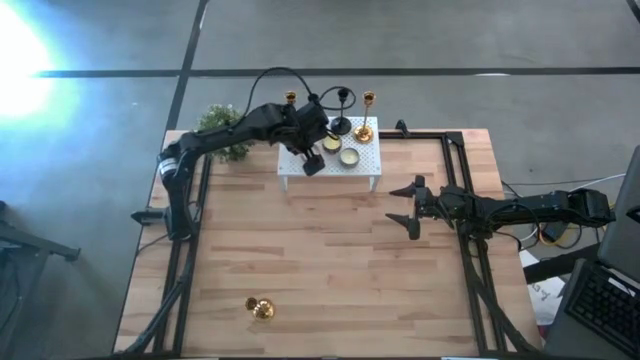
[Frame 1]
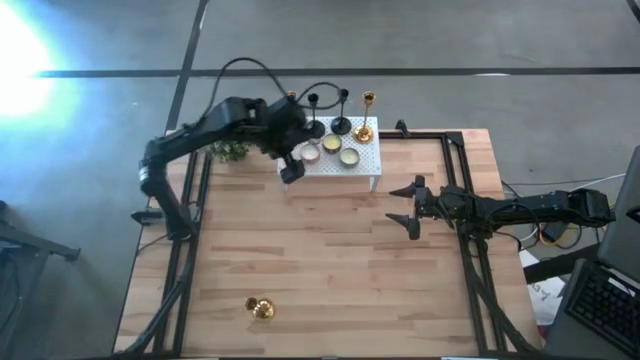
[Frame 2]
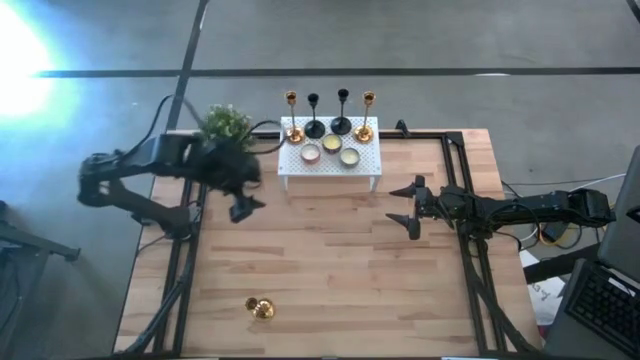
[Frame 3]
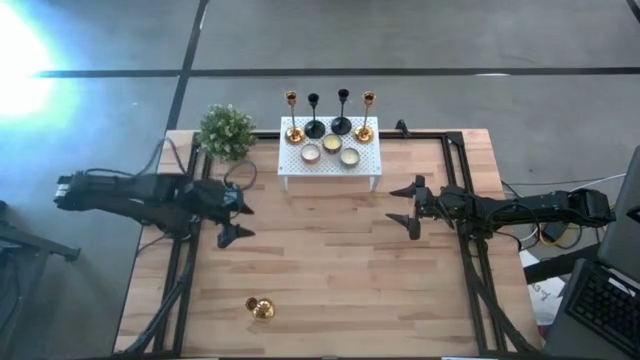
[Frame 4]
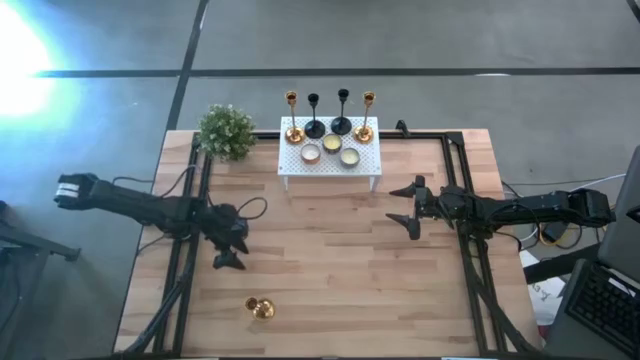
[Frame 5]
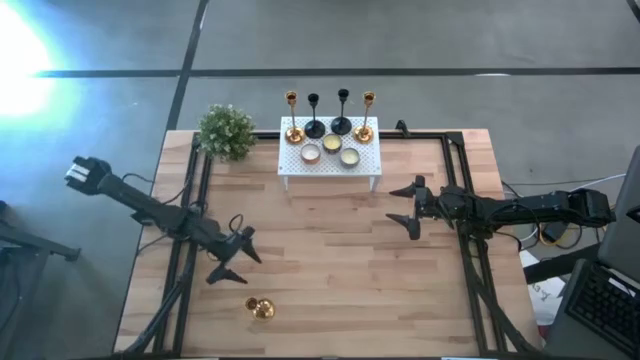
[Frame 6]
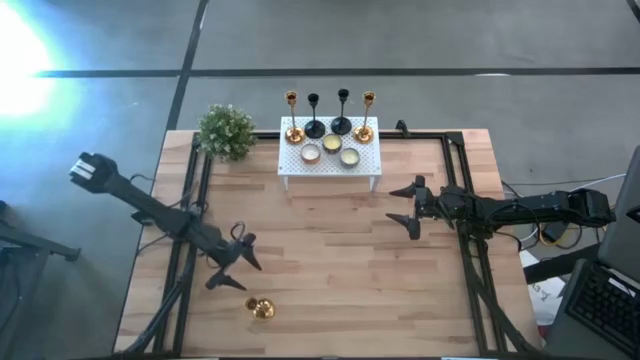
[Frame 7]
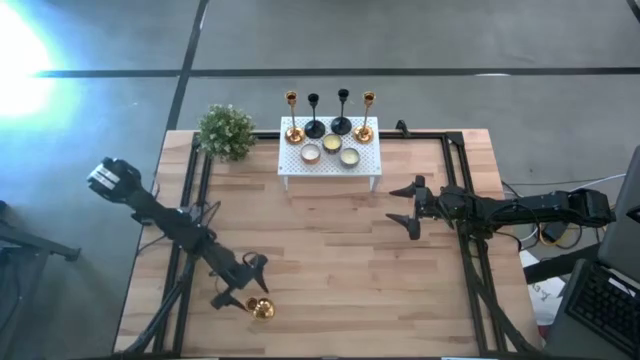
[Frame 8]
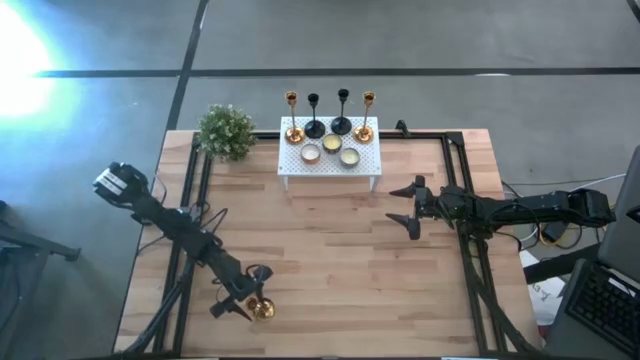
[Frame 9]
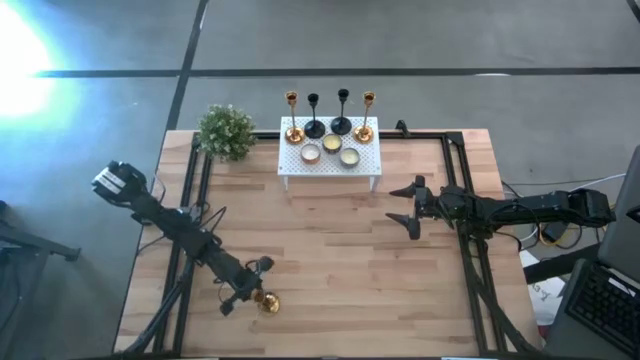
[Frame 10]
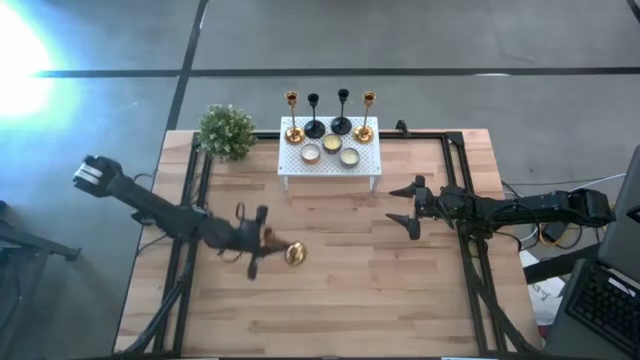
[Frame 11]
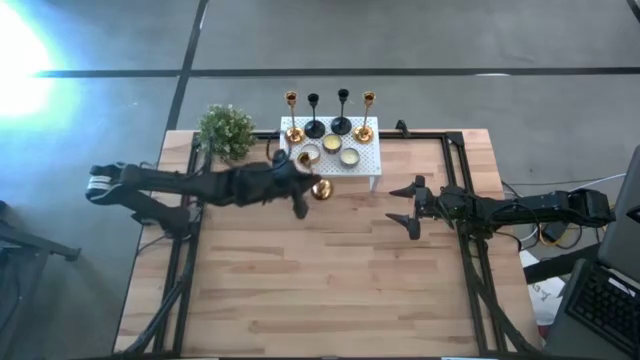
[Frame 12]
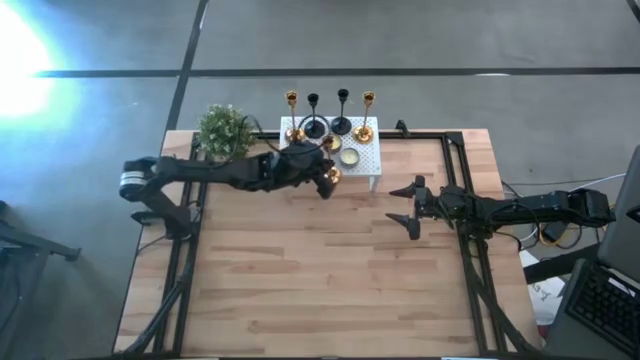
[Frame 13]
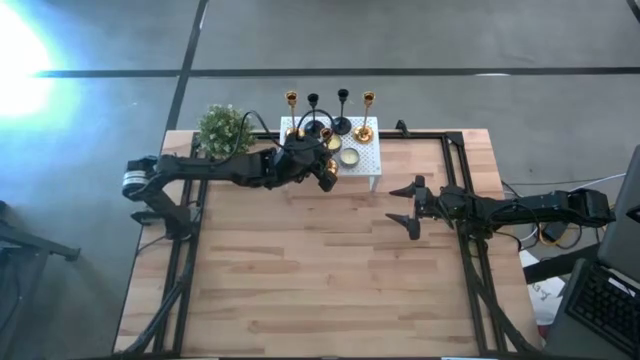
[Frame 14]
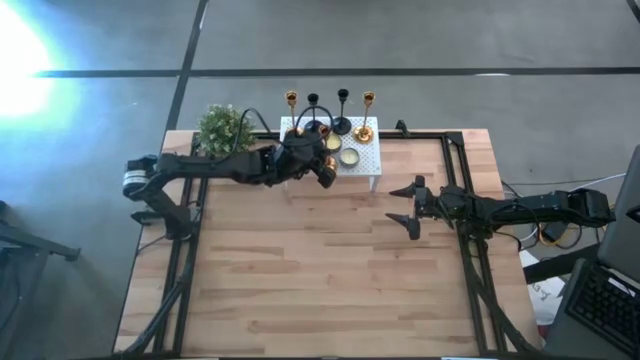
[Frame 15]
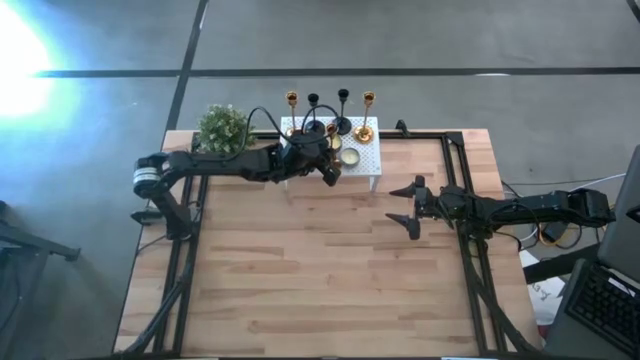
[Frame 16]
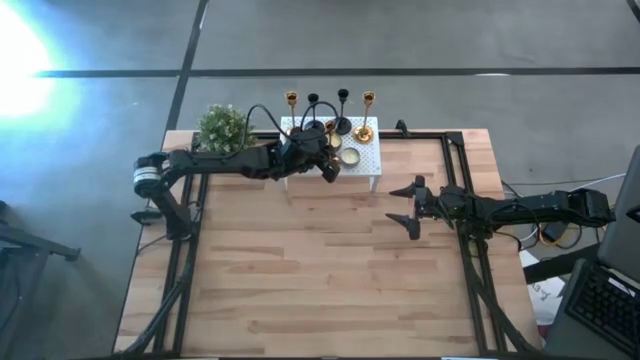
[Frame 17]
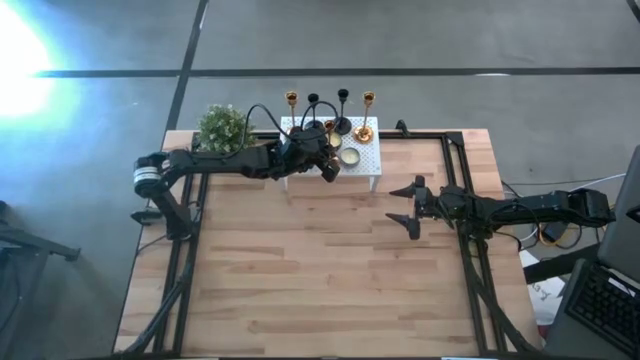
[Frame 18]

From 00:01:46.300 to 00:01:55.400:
Task: Pick & Place candle stick holders
Put the gold candle holder on the shelf

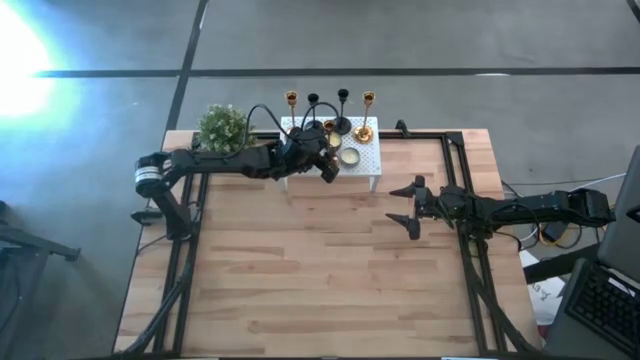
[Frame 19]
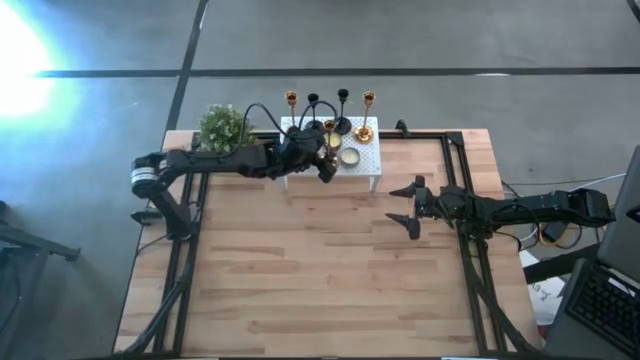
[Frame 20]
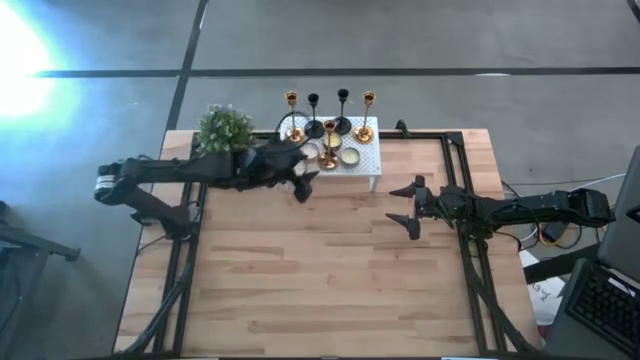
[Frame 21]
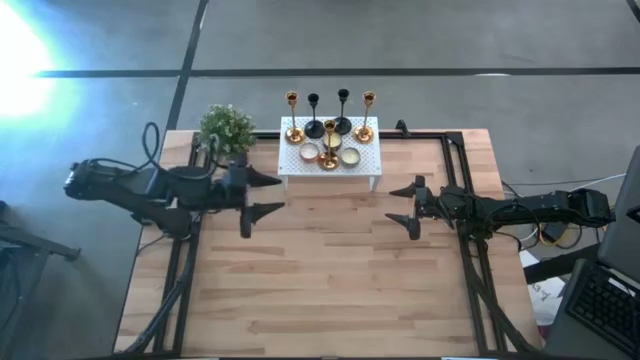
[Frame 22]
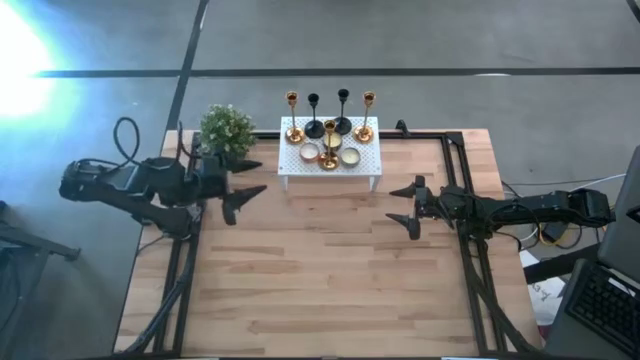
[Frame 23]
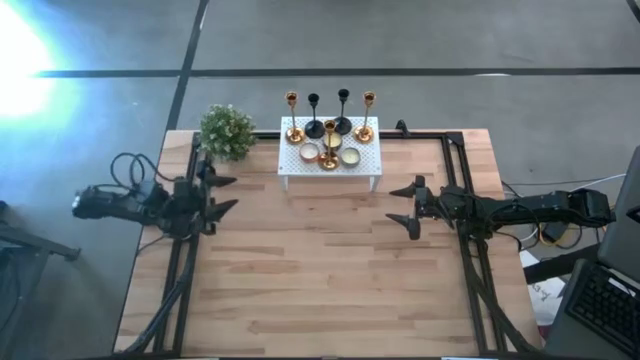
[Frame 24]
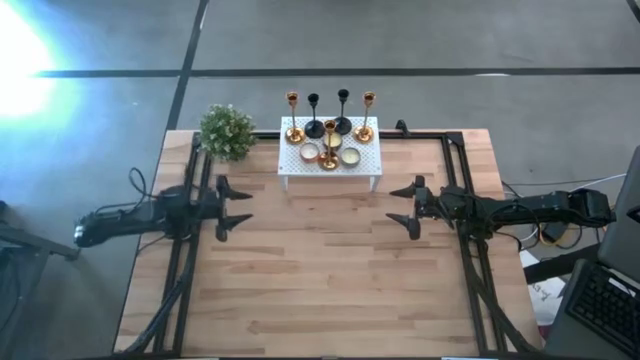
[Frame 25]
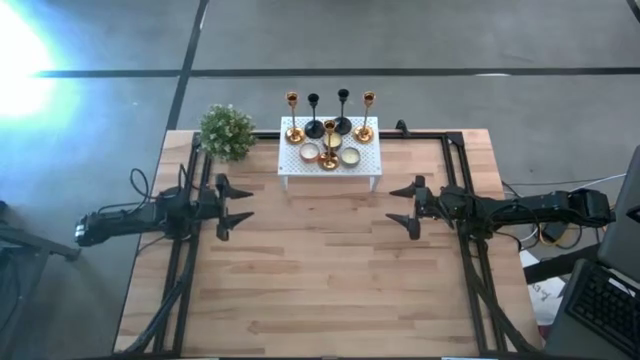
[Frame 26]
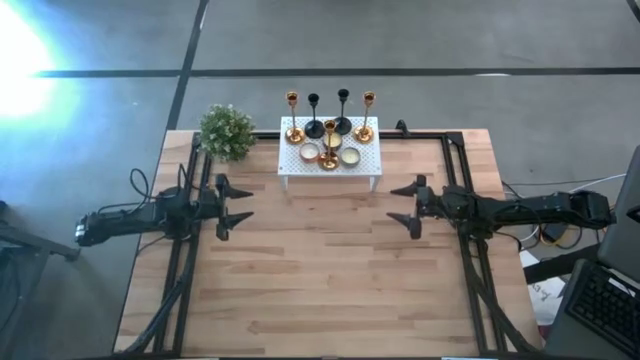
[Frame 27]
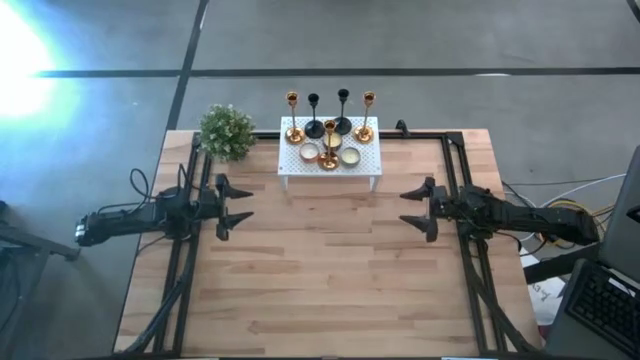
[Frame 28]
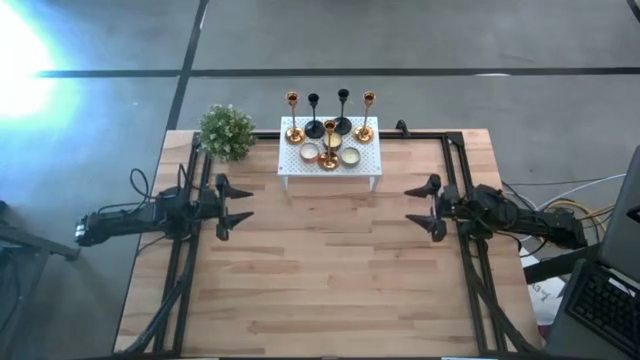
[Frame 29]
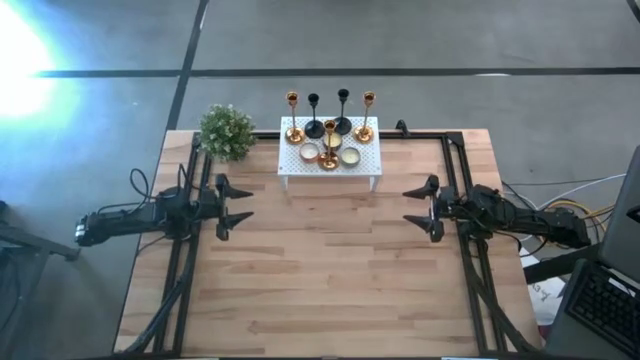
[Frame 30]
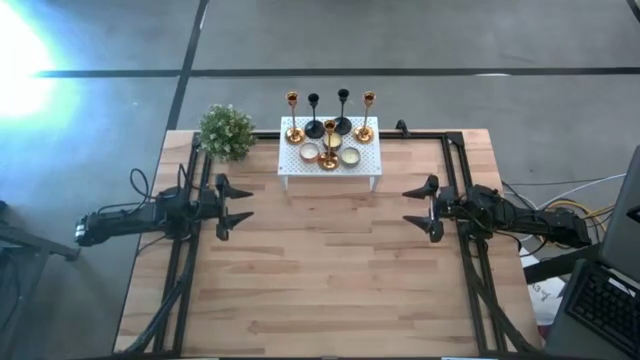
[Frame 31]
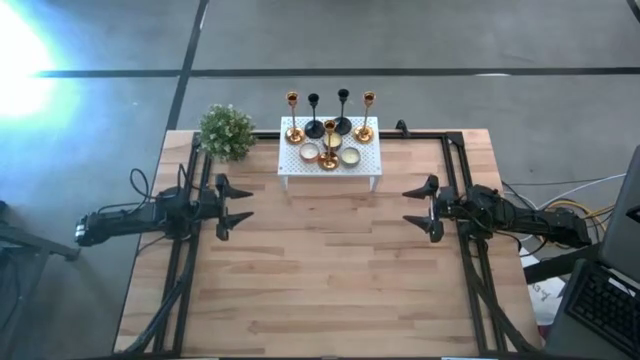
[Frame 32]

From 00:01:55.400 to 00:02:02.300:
Return to Home Position

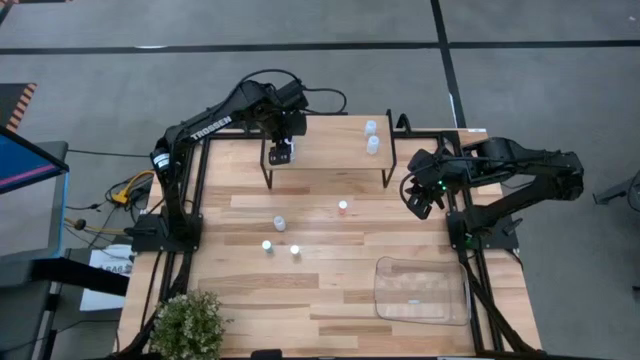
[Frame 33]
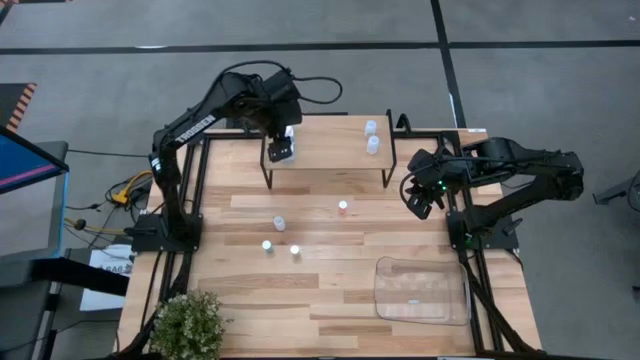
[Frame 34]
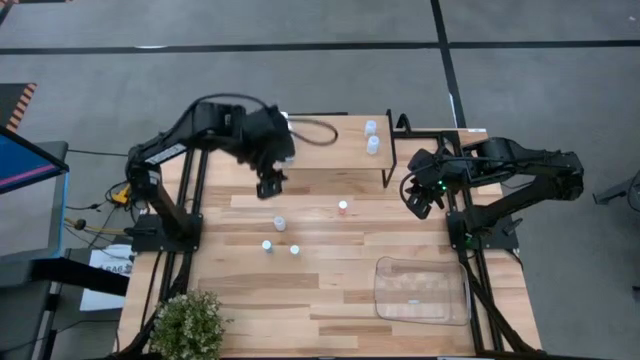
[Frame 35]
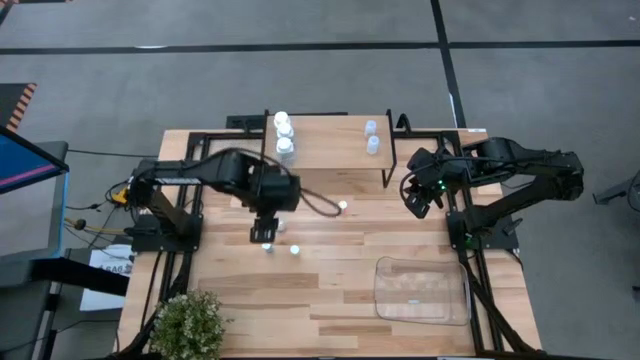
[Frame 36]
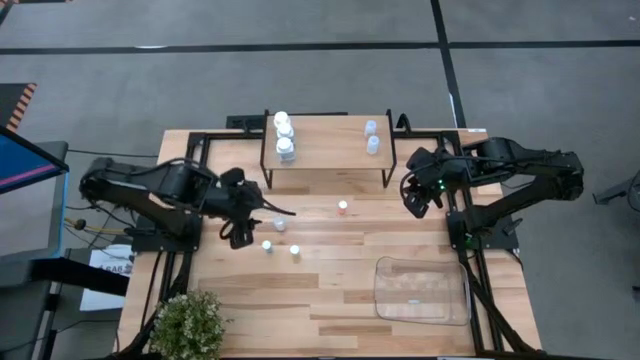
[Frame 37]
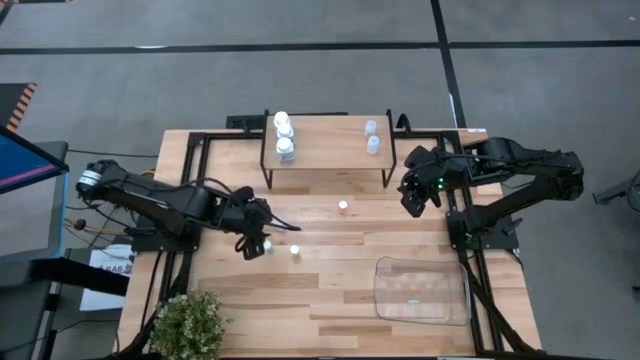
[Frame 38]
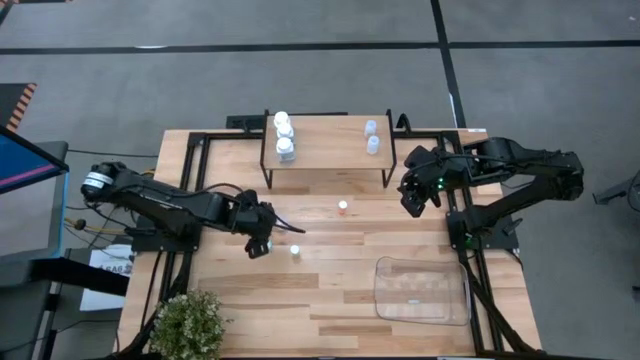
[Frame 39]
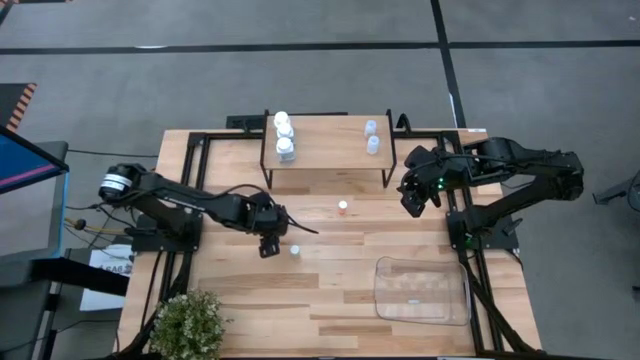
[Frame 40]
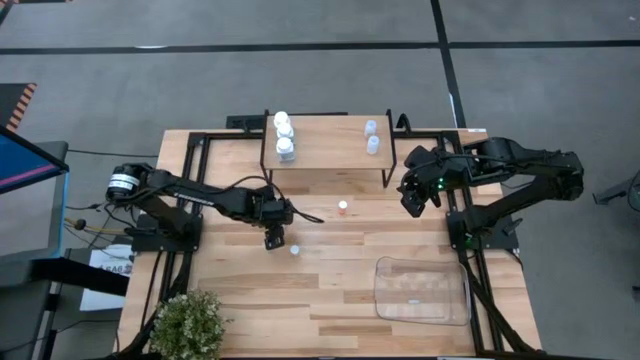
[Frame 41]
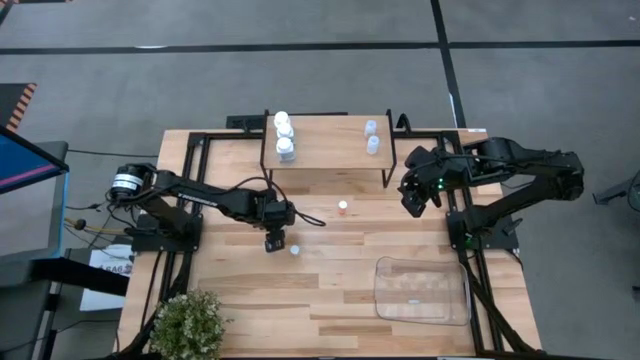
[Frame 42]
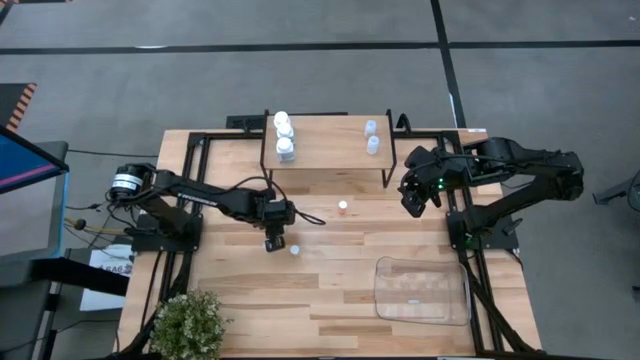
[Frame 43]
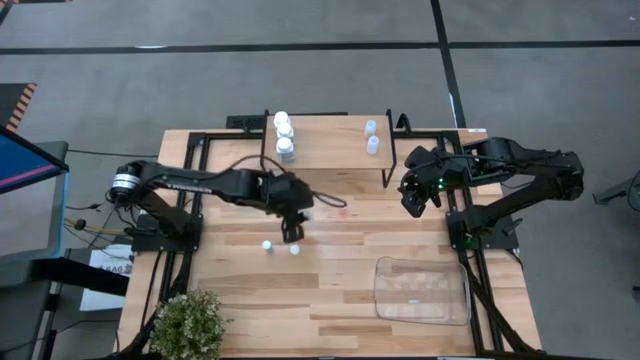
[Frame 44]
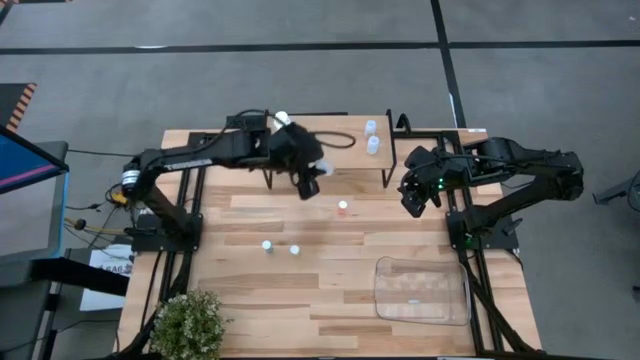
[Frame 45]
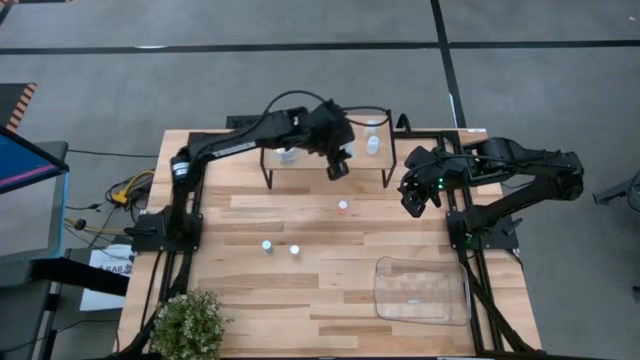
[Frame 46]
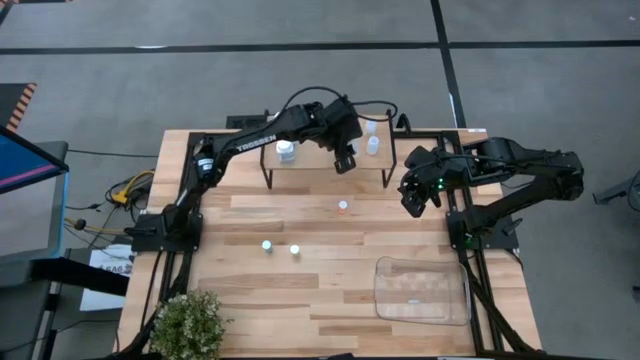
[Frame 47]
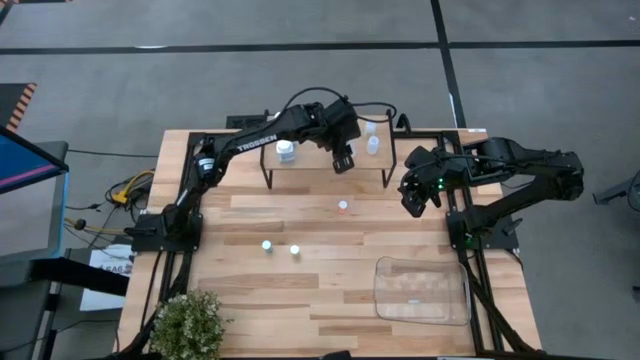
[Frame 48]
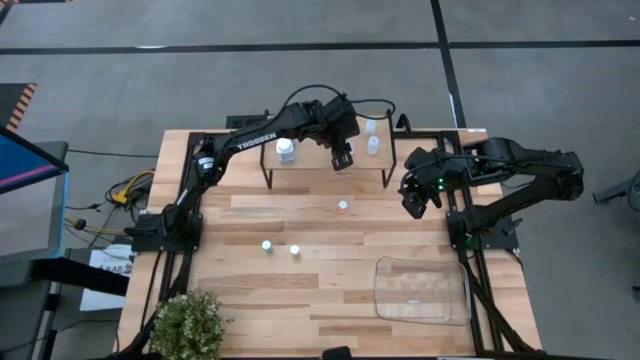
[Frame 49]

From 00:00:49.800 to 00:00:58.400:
Task: Pick and place medicine bottles onto shelf by color
Put the transparent pill bottle on the shelf
